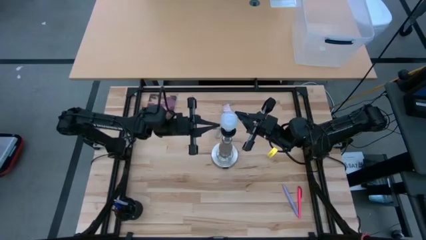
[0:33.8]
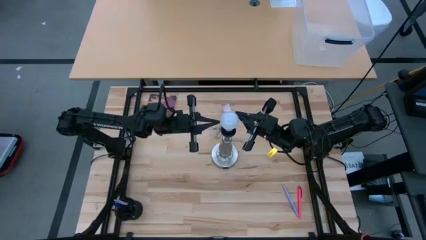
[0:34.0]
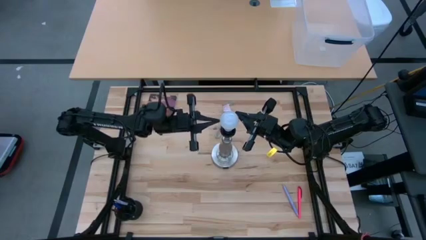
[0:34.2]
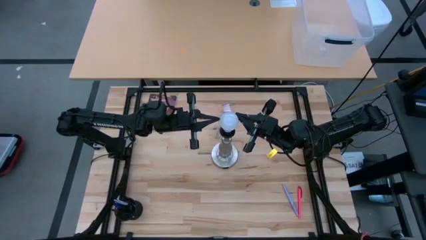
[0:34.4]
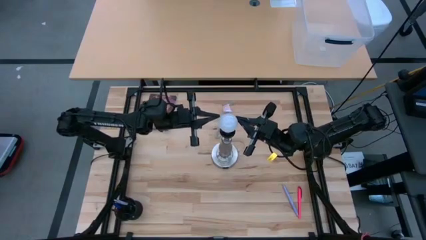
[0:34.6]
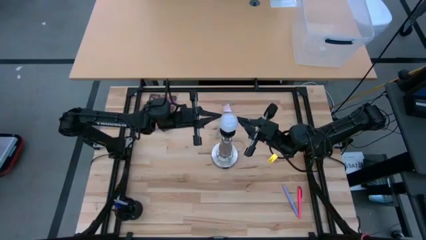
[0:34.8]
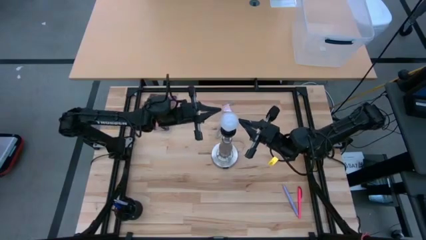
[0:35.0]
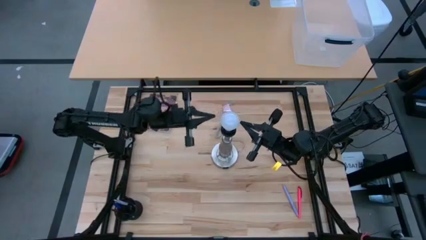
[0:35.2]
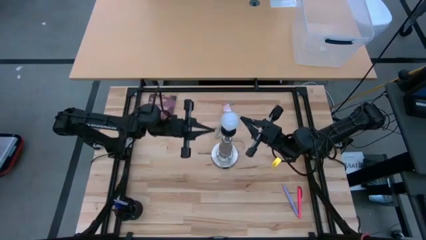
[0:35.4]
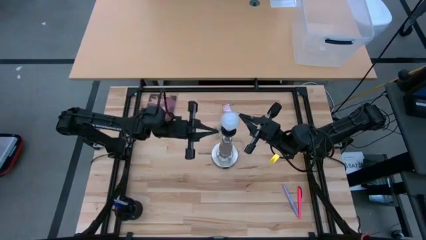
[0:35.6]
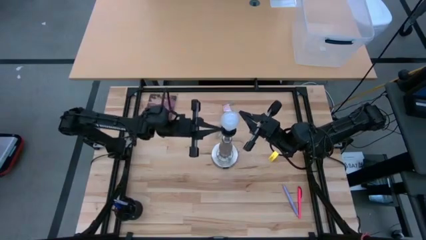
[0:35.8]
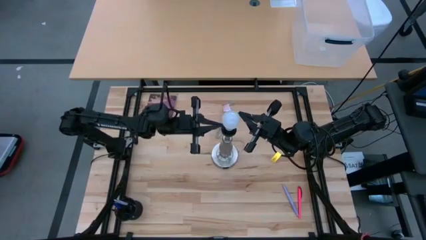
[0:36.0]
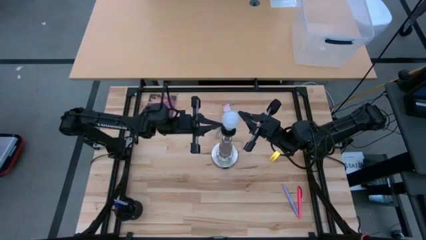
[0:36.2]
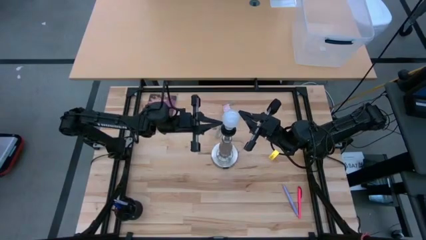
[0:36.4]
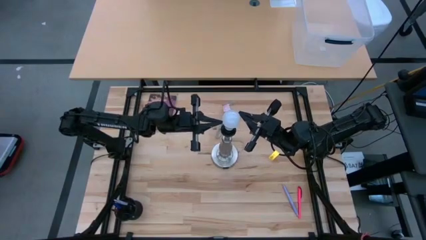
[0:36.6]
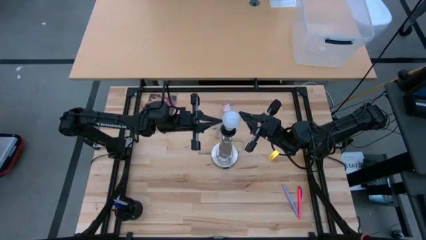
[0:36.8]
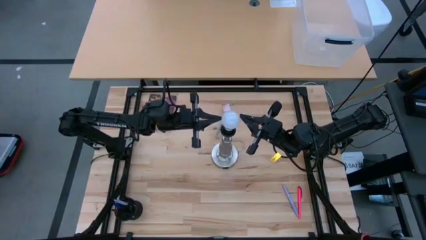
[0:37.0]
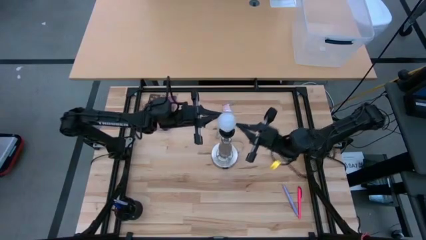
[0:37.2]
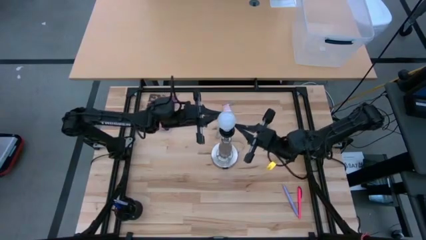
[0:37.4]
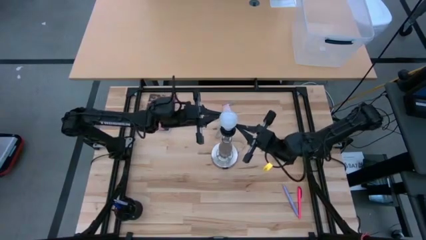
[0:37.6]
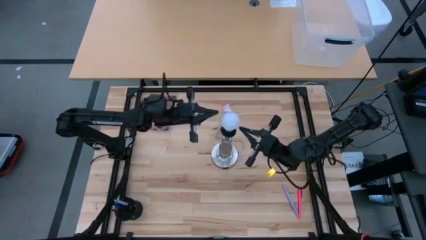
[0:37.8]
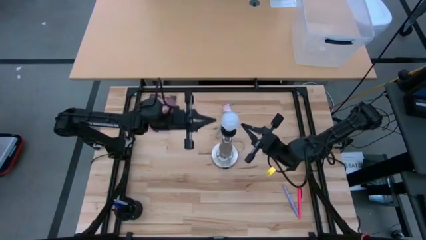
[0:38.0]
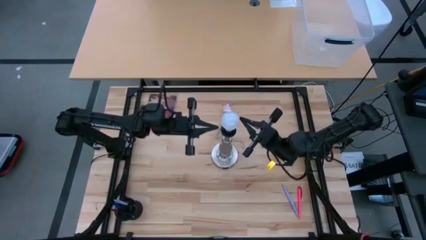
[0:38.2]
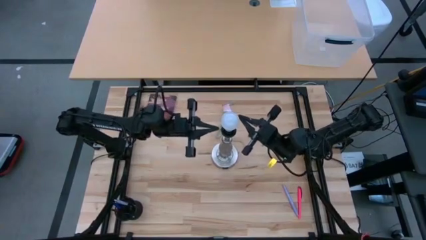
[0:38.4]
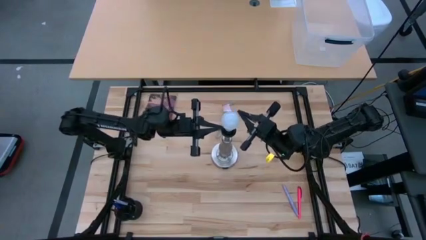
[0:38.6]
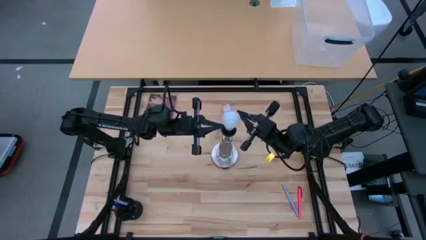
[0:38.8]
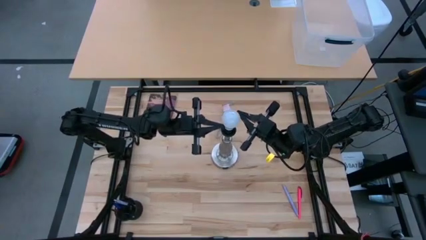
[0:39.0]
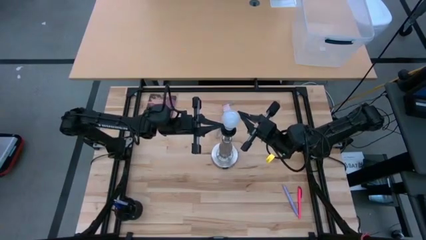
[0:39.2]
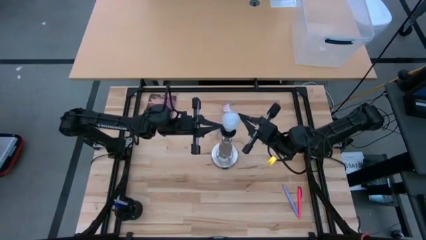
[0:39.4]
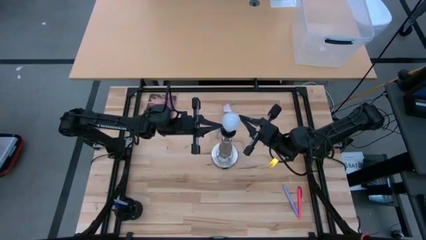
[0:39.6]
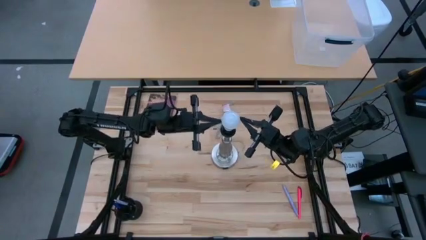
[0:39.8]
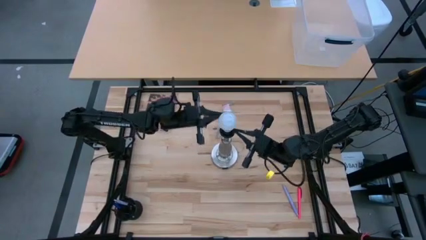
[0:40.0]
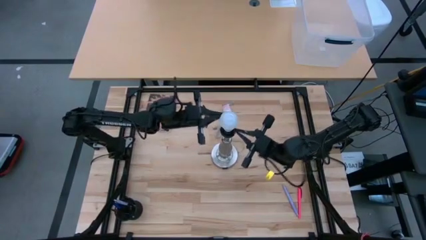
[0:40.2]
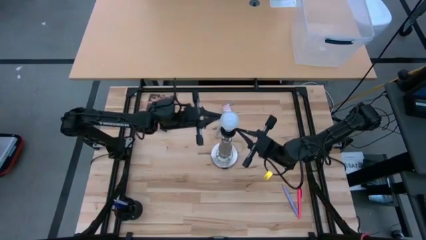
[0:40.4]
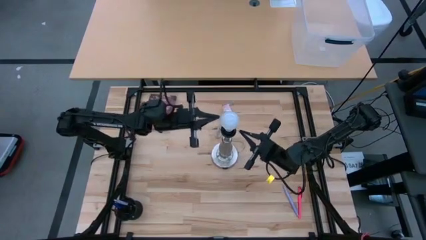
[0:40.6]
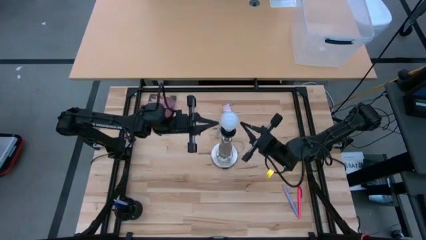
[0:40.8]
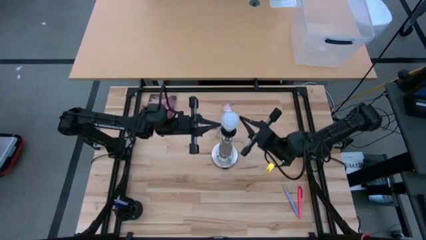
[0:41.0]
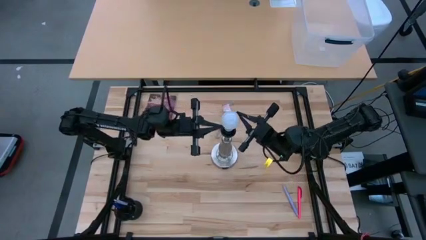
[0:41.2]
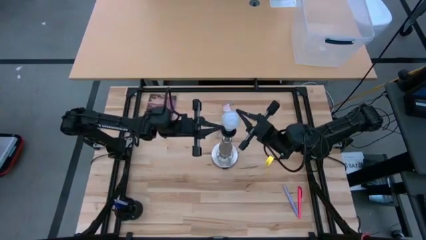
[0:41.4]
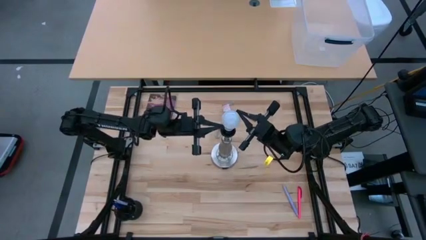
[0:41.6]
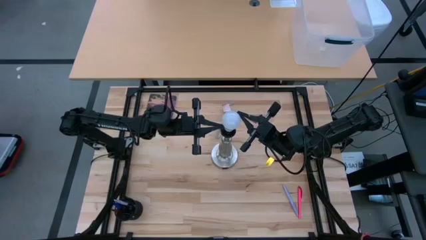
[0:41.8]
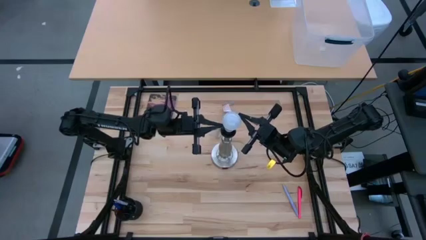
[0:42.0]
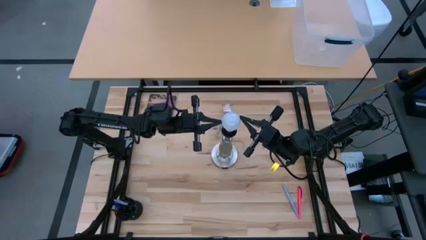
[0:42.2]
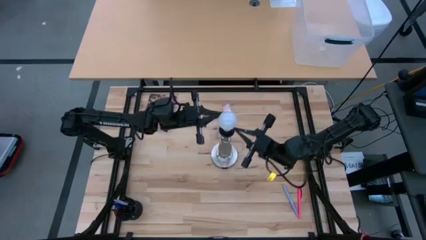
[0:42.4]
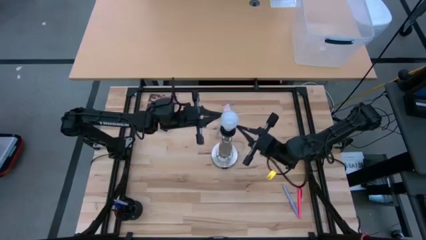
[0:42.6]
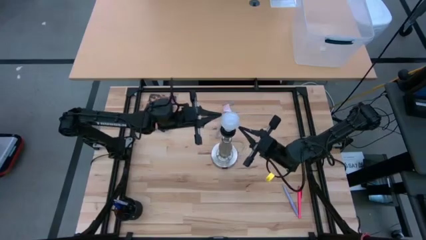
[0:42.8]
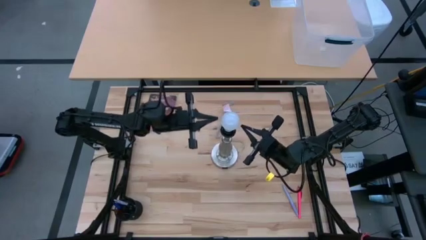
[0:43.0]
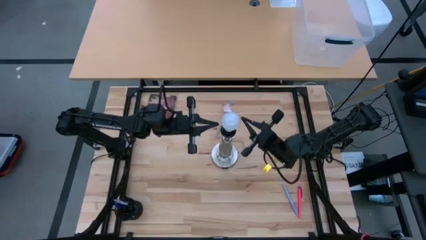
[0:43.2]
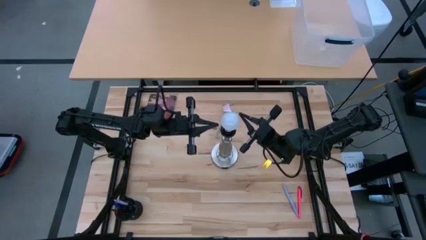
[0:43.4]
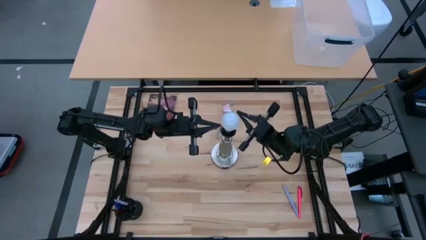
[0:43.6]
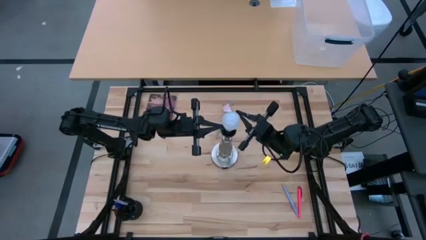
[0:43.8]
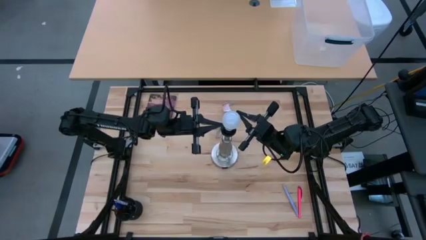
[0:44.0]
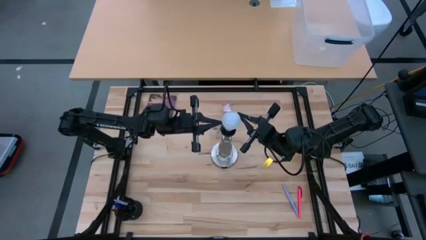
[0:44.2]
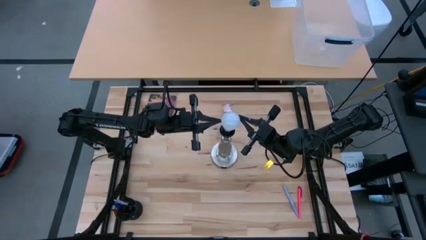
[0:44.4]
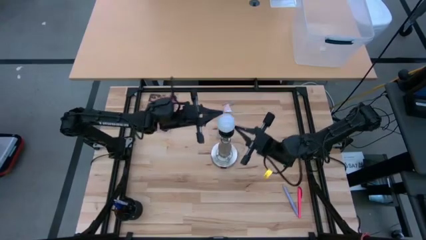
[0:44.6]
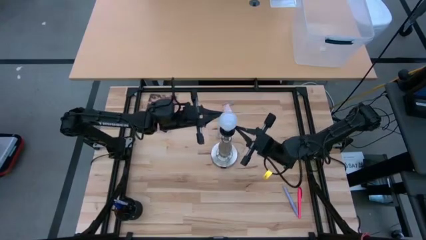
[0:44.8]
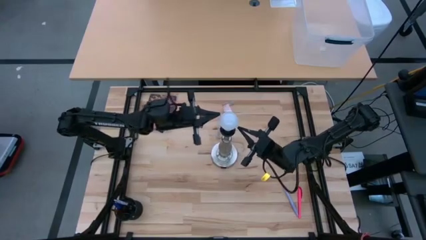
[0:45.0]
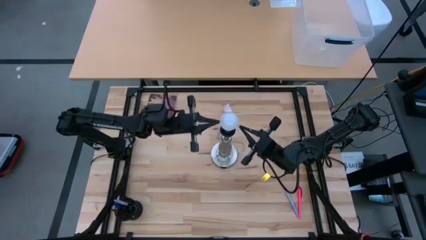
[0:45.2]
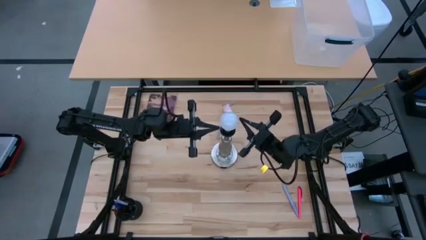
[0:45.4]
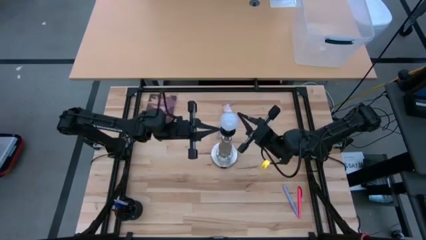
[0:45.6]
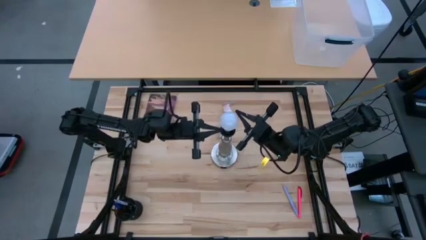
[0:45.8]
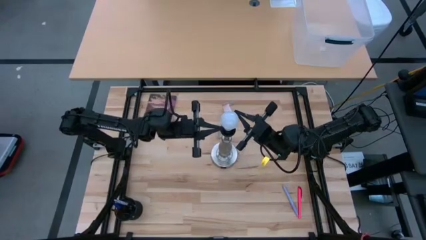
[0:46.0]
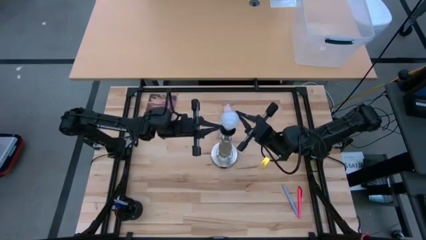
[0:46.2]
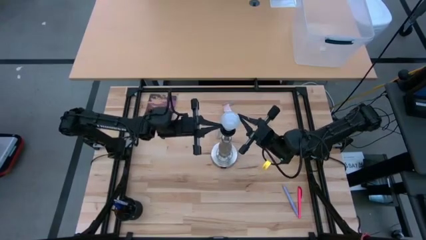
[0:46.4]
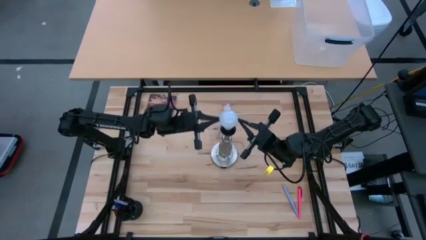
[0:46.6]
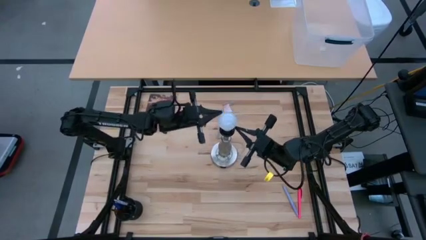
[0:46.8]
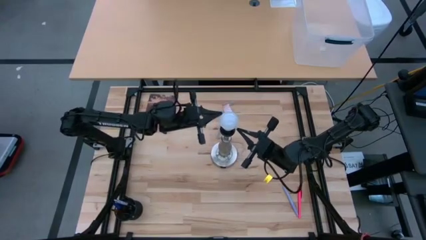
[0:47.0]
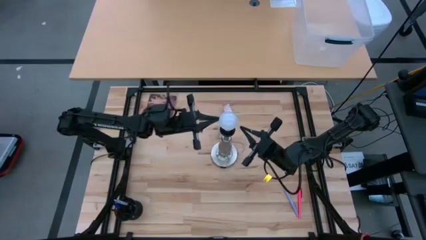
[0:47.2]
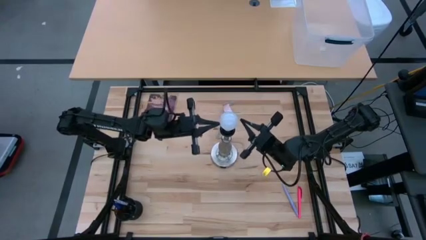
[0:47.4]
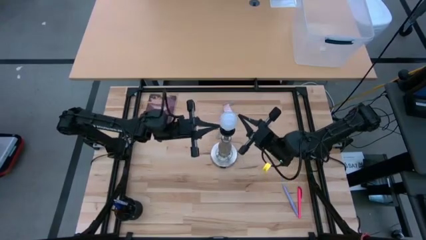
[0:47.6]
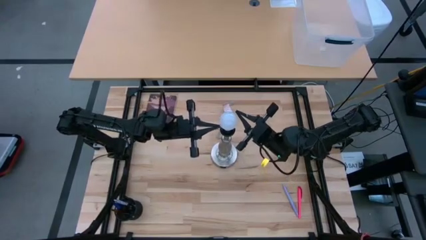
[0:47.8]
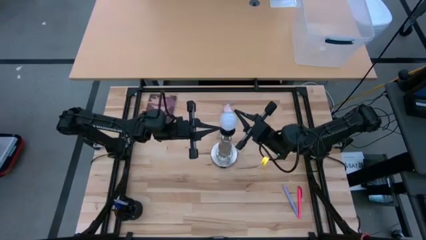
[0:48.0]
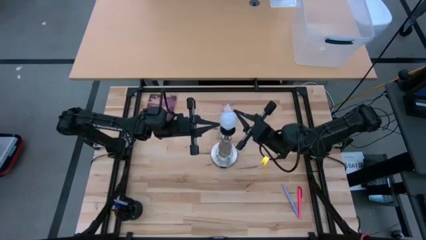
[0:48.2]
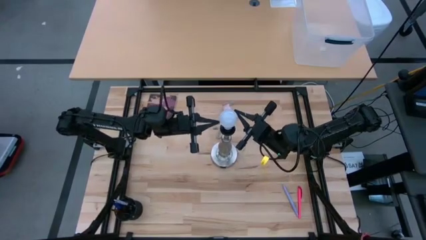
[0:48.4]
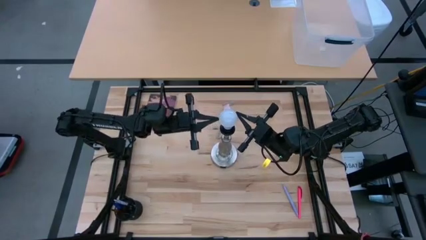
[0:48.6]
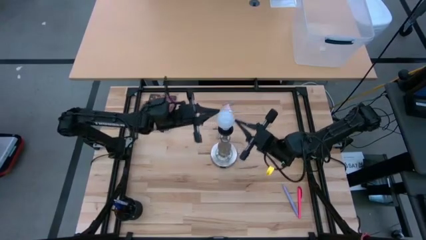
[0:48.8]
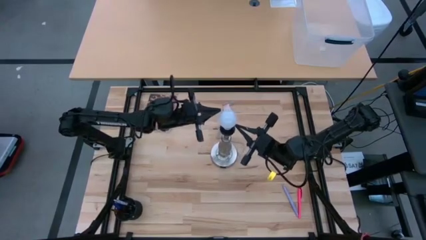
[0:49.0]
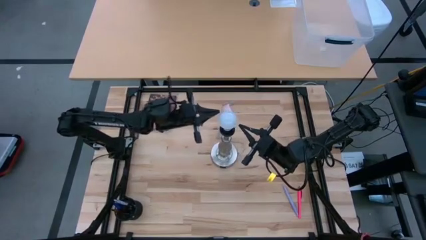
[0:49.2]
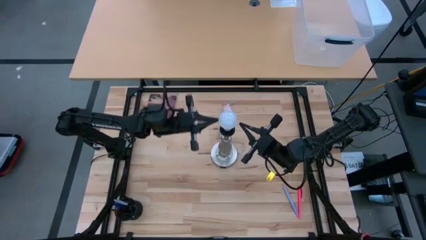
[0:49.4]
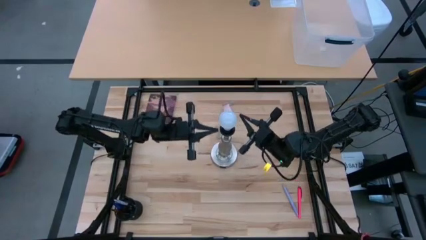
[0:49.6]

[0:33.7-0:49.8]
Task: Screw lightbulb
Insert the lightbulb into the lamp
